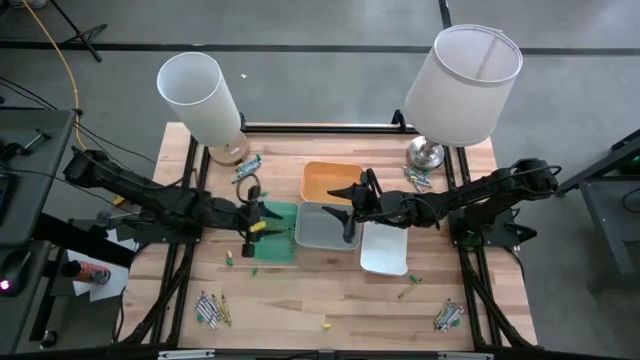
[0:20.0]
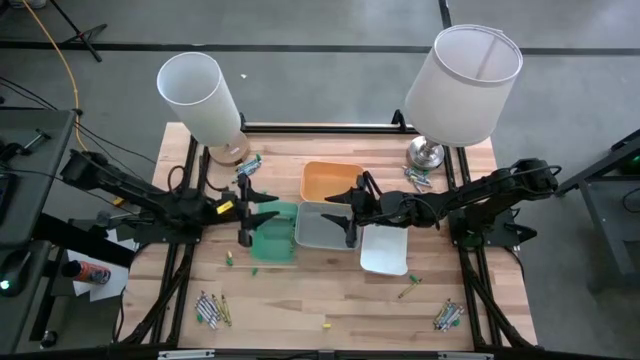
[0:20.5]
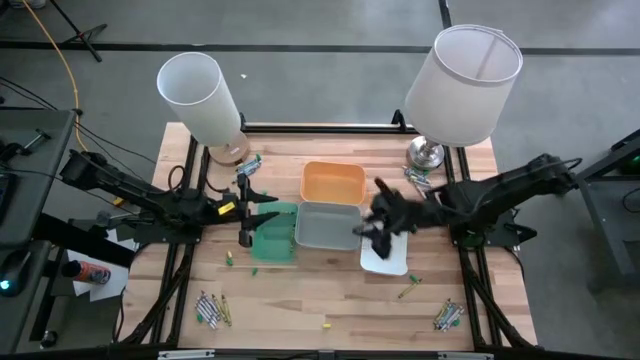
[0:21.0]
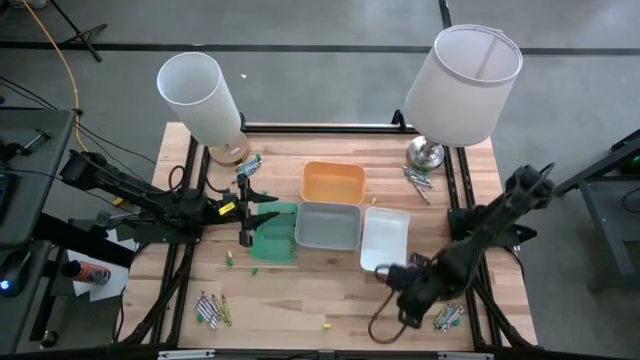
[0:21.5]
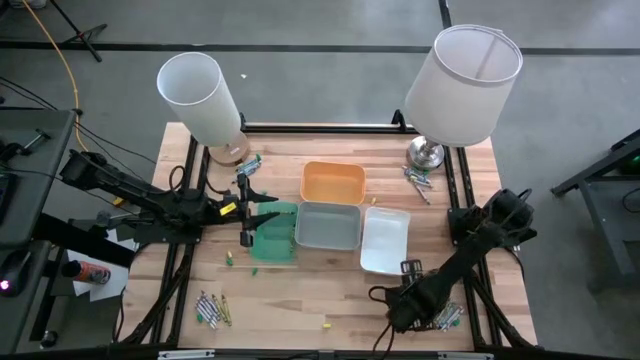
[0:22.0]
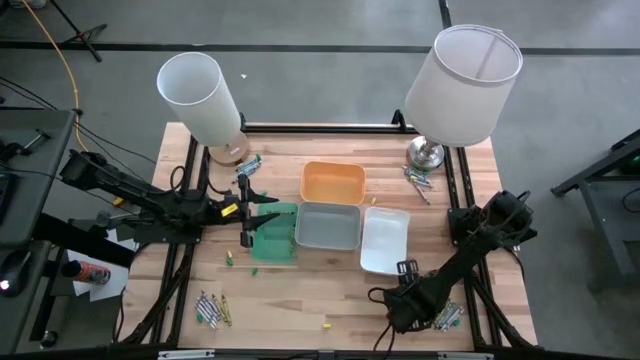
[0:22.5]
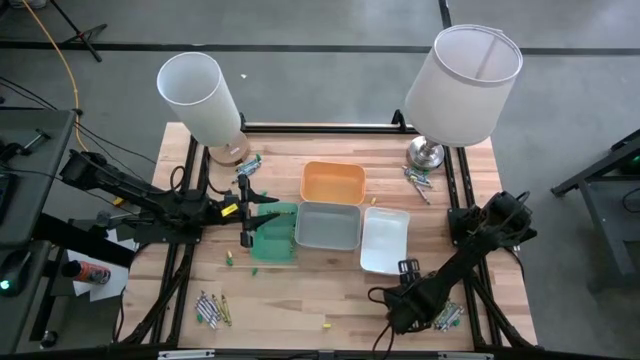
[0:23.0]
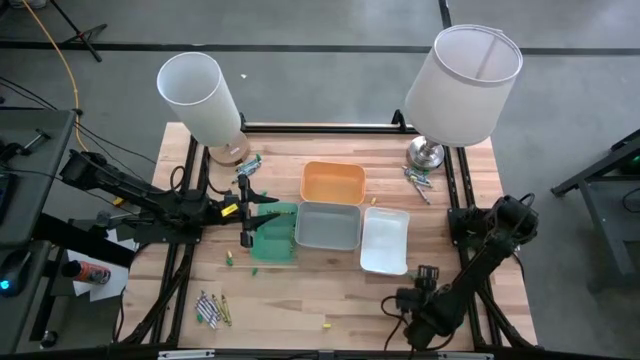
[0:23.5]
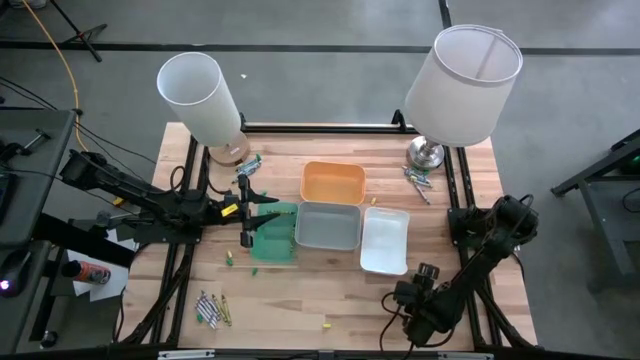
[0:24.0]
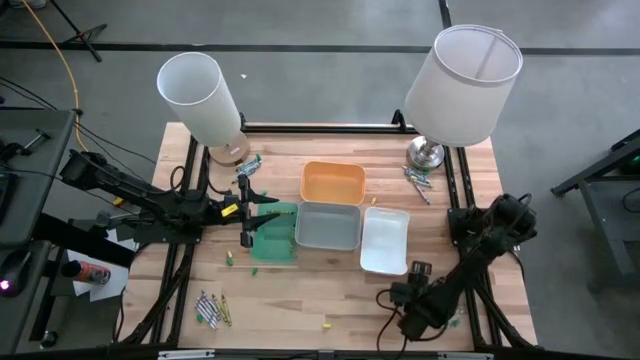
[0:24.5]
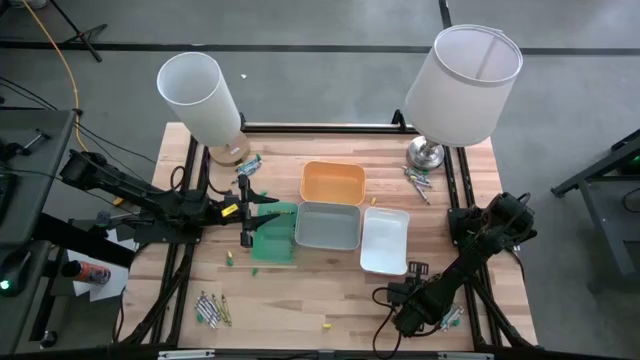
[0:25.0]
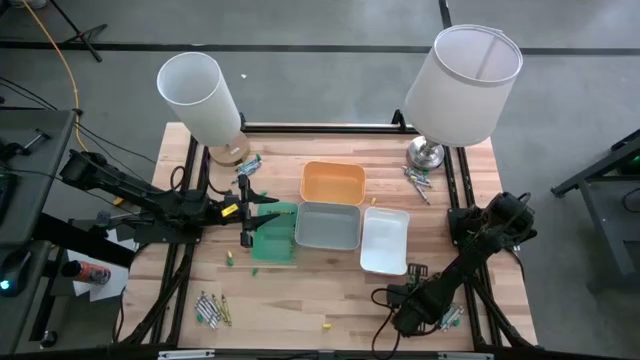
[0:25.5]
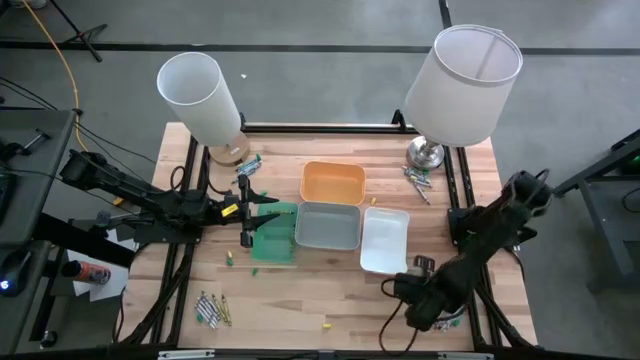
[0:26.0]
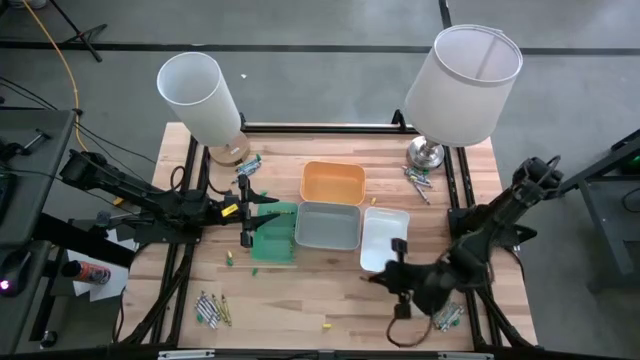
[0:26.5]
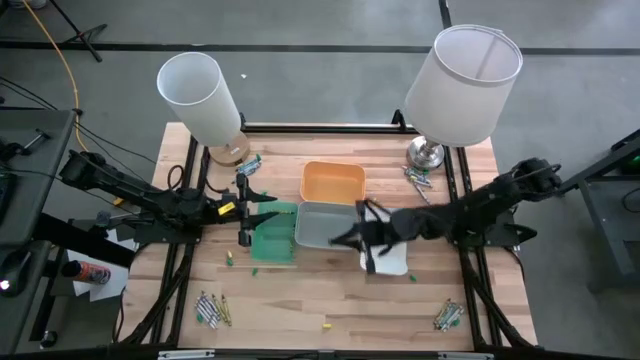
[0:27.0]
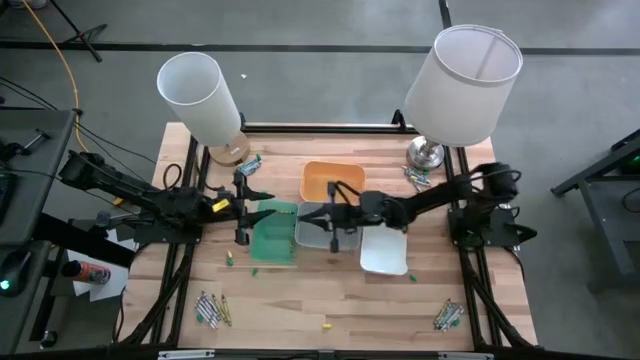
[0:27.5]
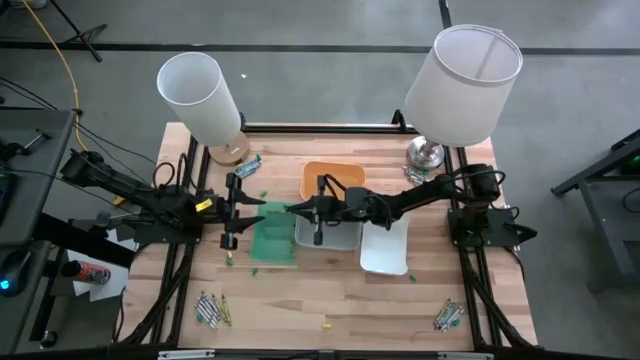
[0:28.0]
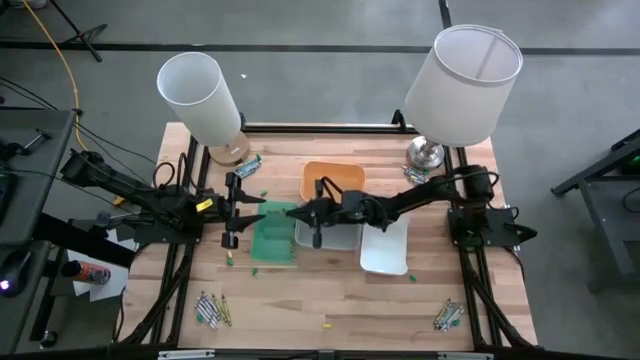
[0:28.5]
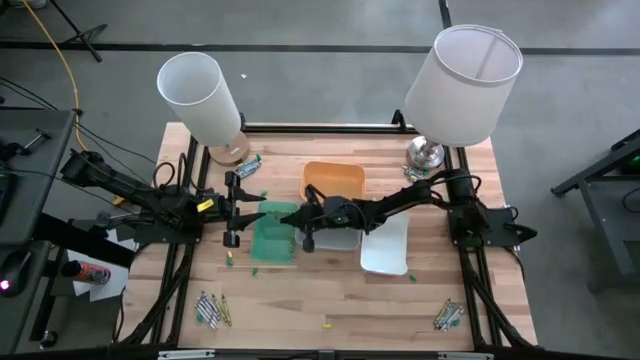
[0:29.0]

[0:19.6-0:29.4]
Task: Sort crayons
Put the green crayon into the green bin

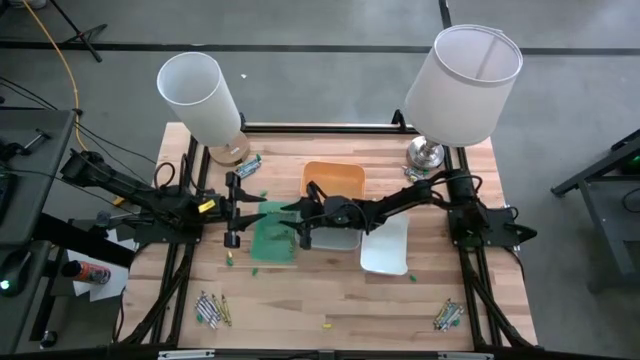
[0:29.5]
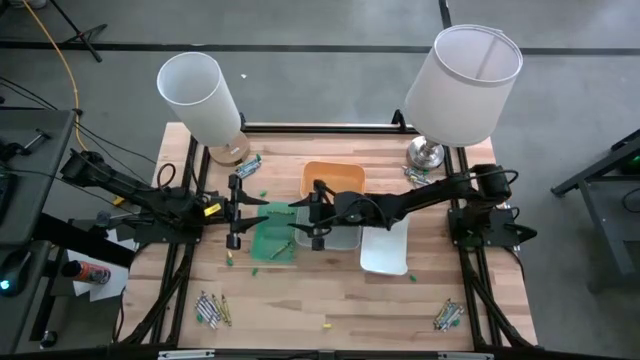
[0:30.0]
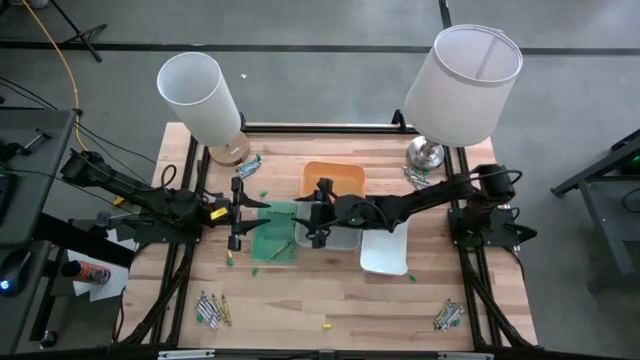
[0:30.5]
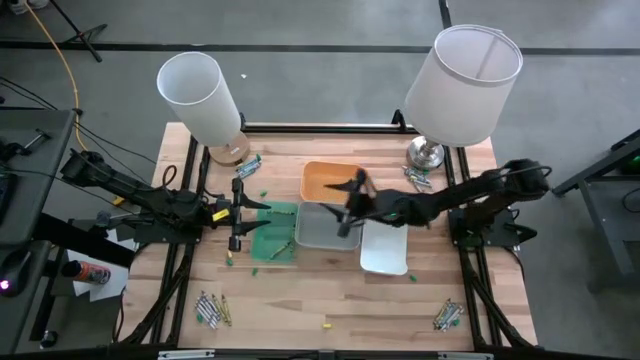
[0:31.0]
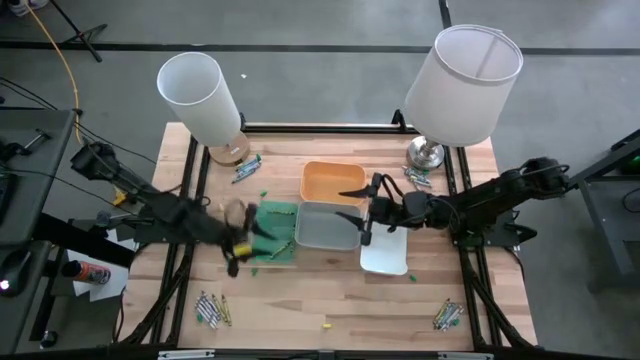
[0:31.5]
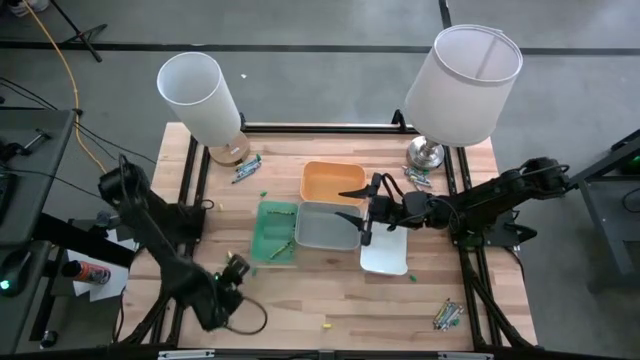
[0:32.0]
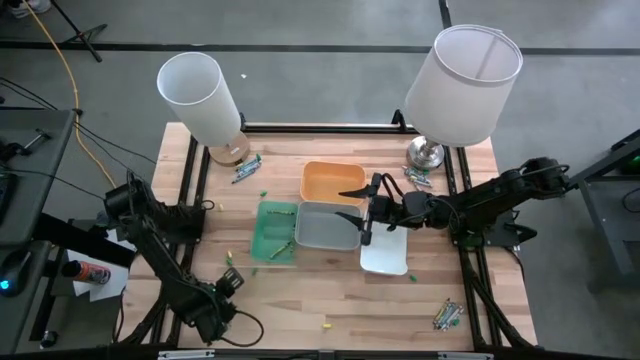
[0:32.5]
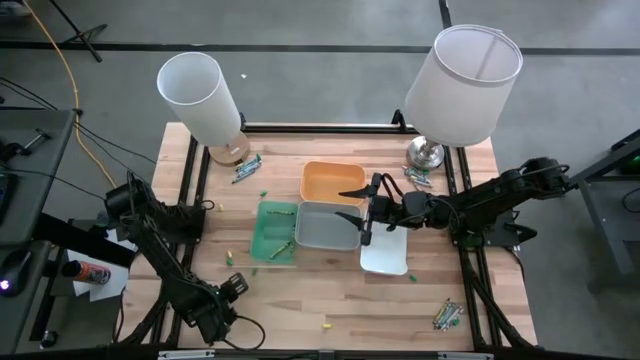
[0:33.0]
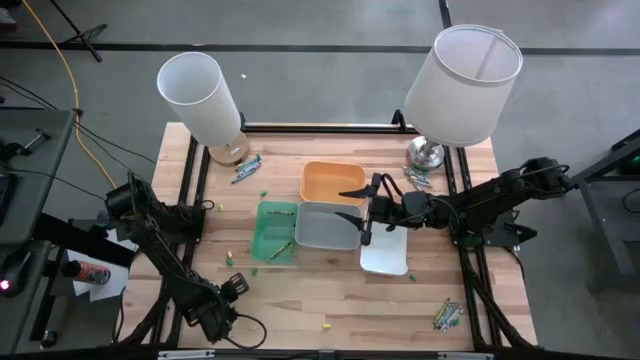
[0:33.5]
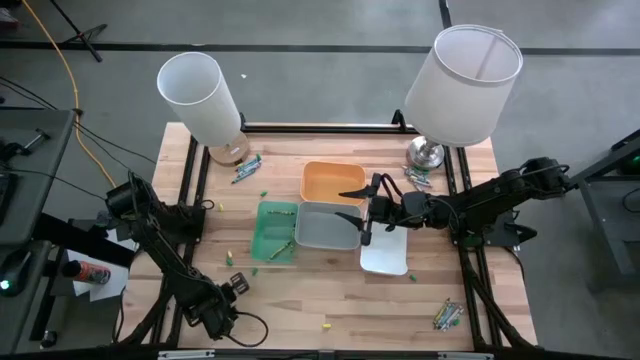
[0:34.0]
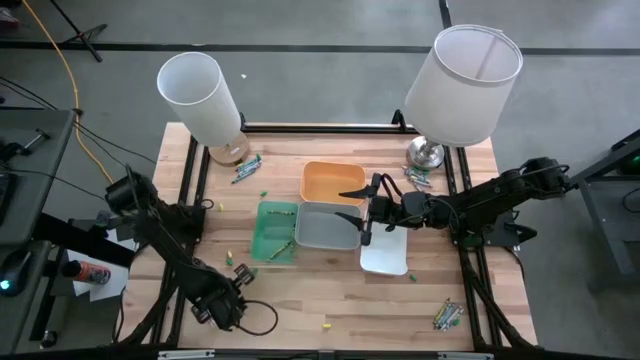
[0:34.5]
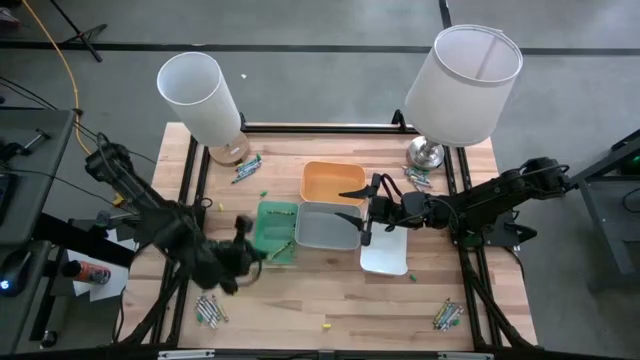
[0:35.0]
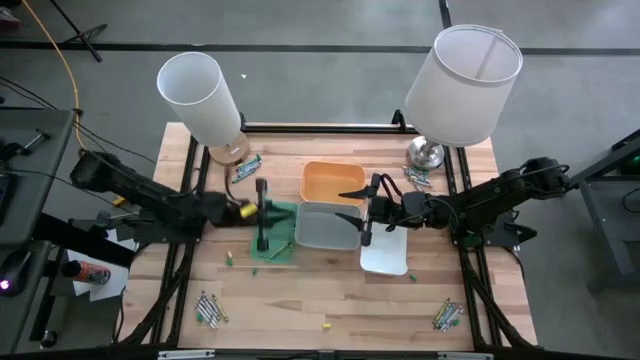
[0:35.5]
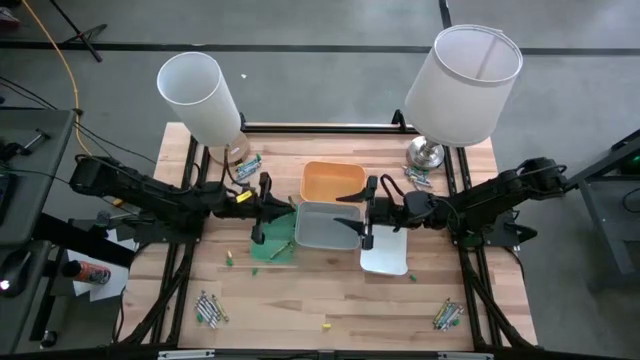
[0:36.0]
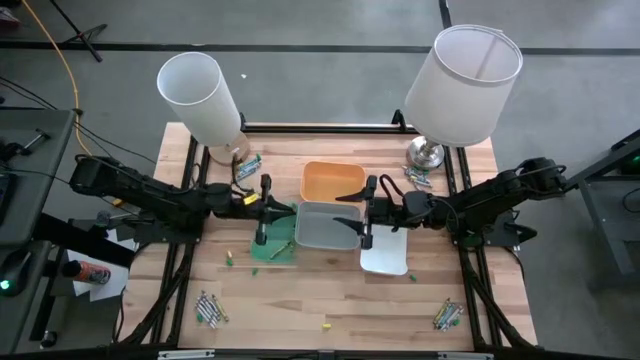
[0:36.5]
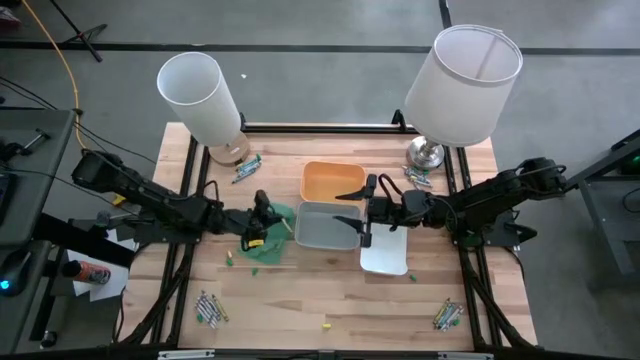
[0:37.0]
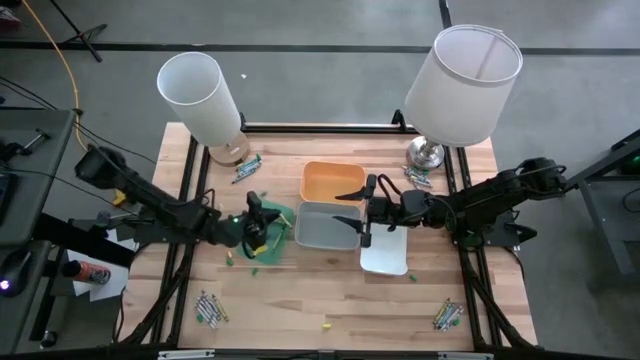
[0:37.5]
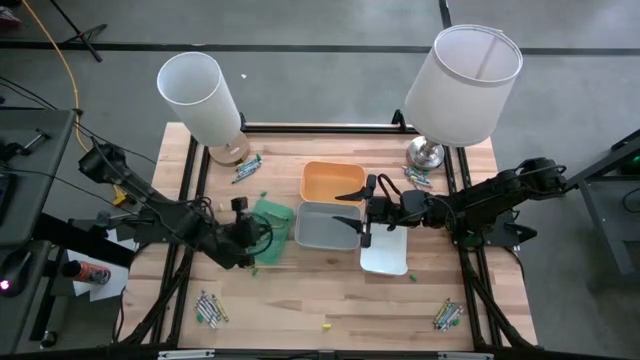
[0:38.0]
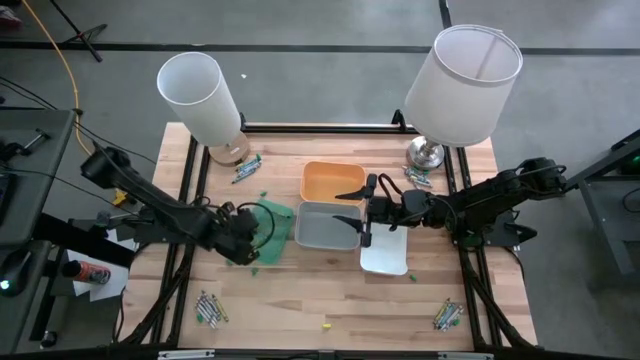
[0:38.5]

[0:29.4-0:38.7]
Put the green crayon into the green bin

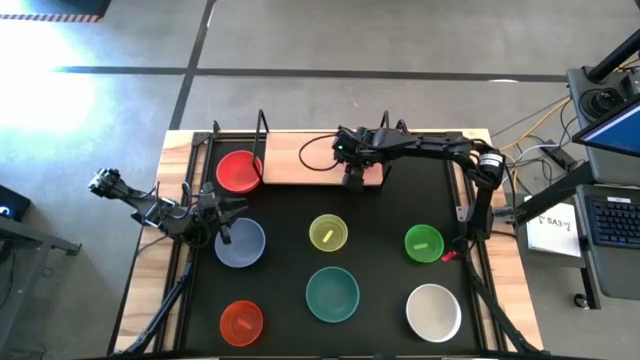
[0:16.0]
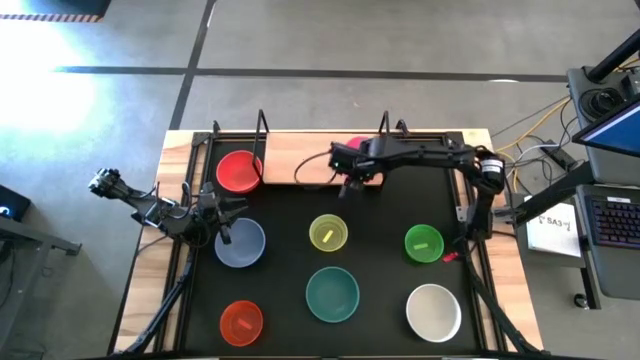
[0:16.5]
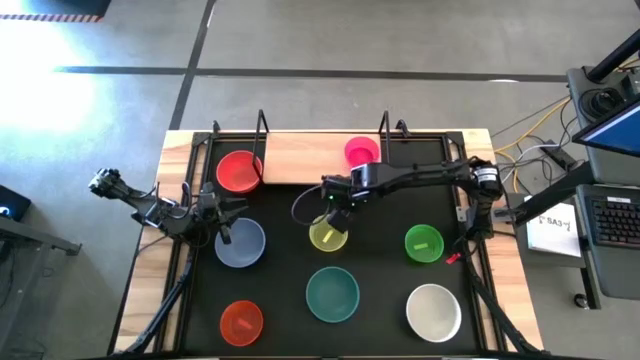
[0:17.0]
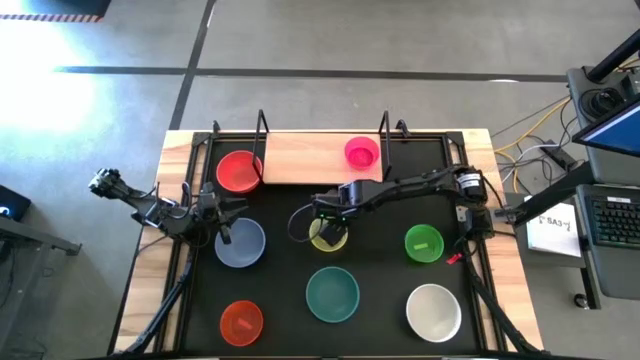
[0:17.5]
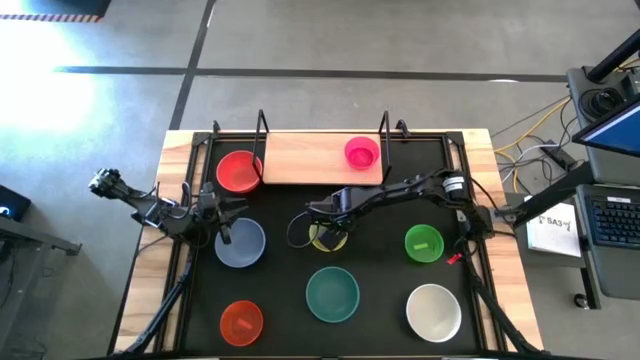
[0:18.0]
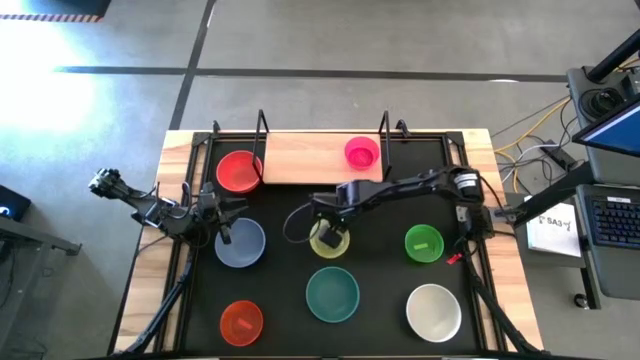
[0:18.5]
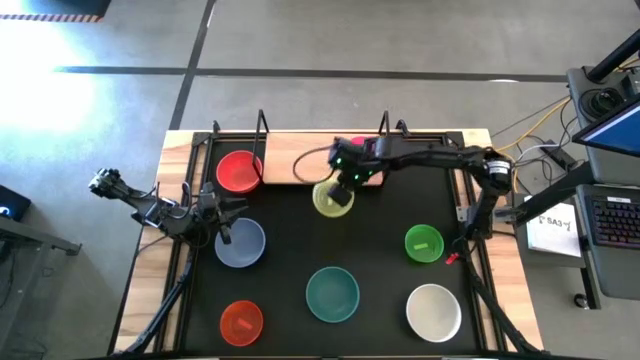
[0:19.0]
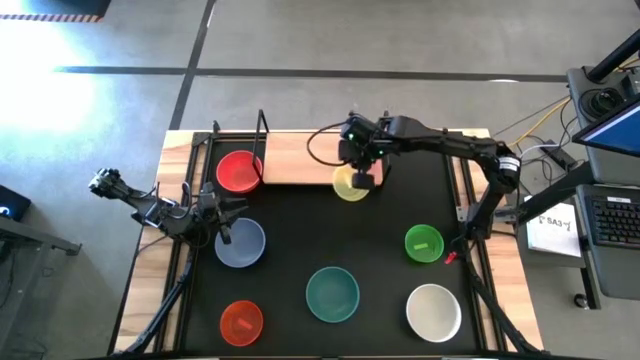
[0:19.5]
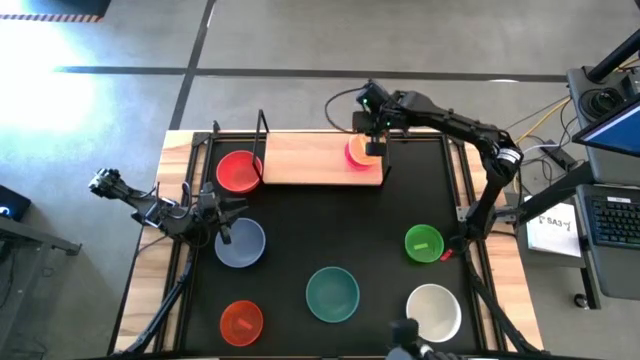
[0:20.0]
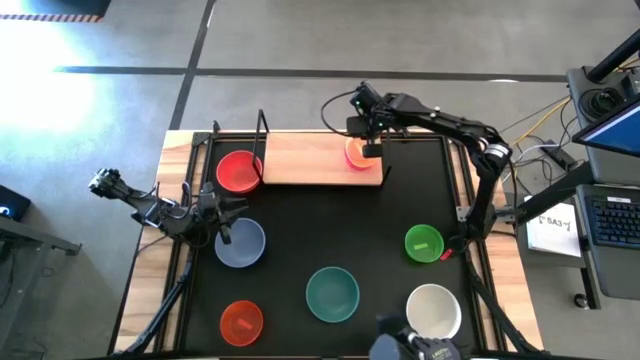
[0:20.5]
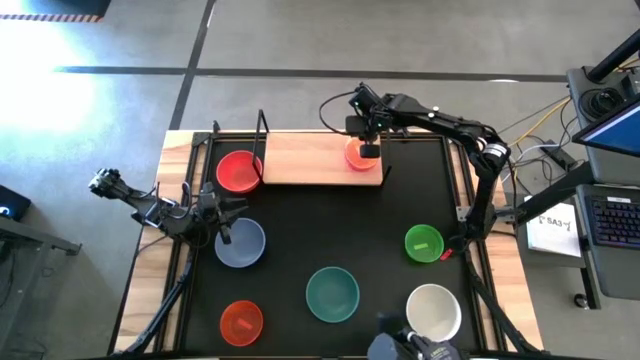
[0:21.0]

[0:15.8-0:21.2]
Task: Place and stack bowls onto a shelf
Stack the light yellow bowl on top of the light pink bowl on the shelf
